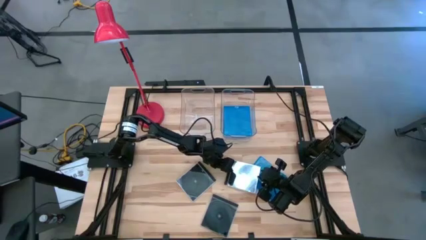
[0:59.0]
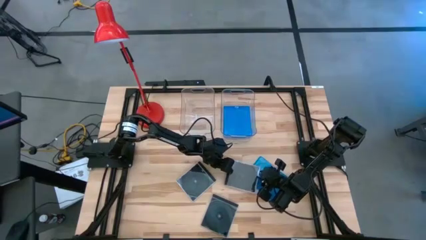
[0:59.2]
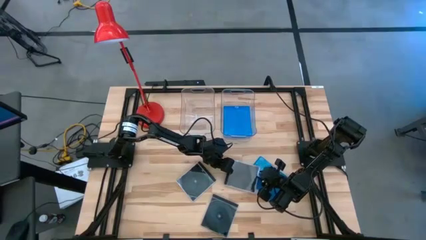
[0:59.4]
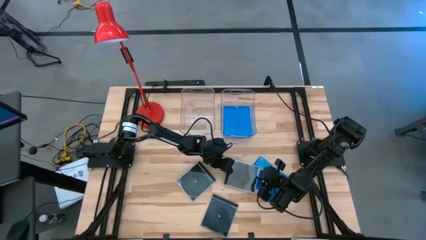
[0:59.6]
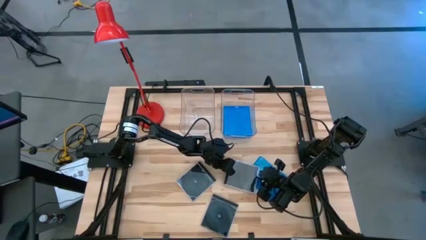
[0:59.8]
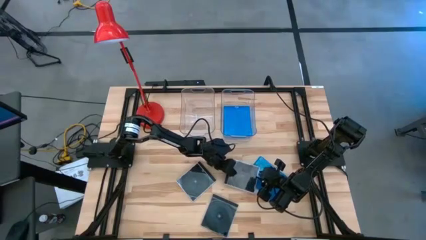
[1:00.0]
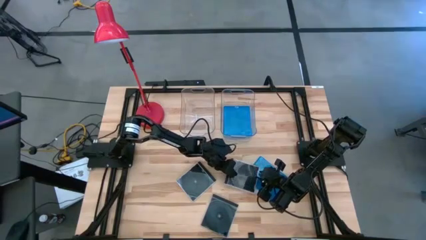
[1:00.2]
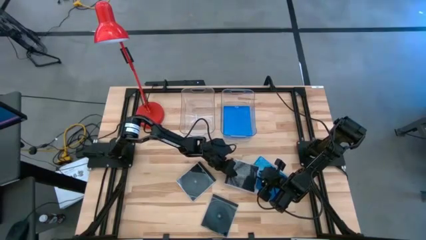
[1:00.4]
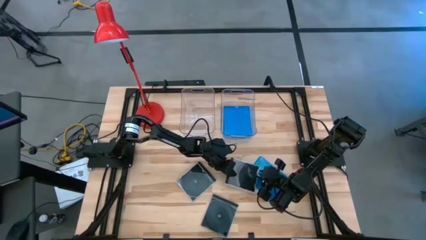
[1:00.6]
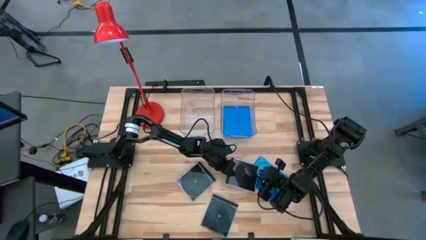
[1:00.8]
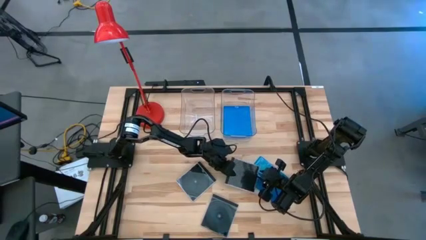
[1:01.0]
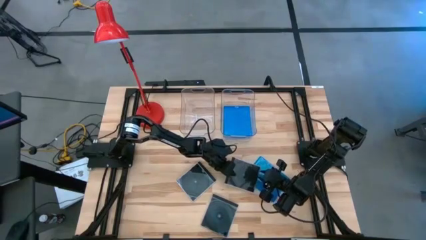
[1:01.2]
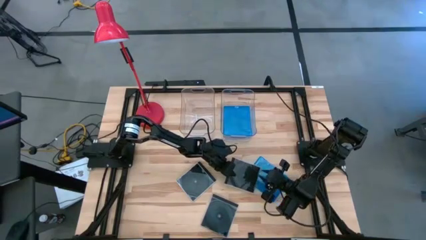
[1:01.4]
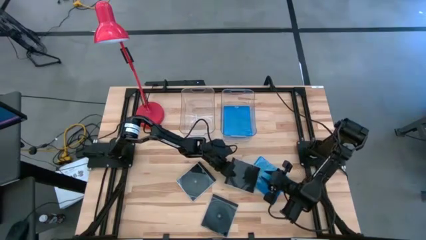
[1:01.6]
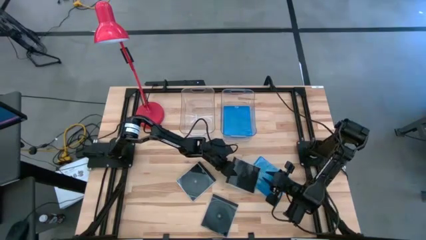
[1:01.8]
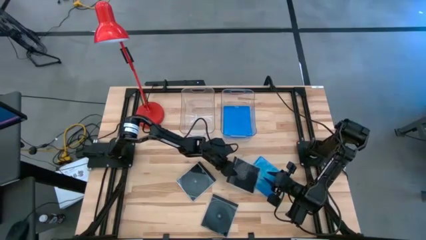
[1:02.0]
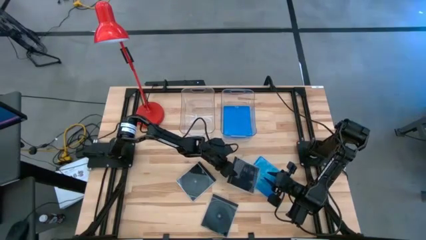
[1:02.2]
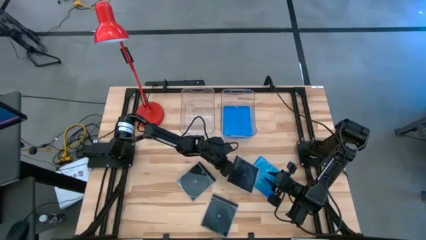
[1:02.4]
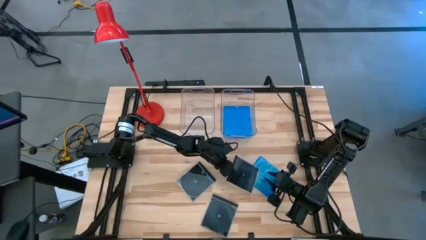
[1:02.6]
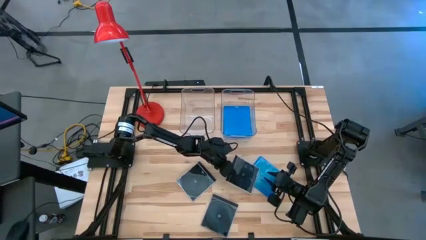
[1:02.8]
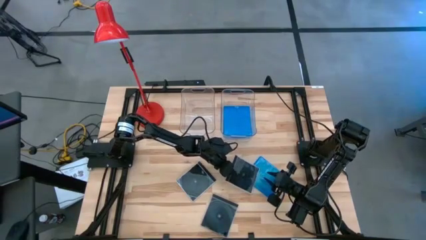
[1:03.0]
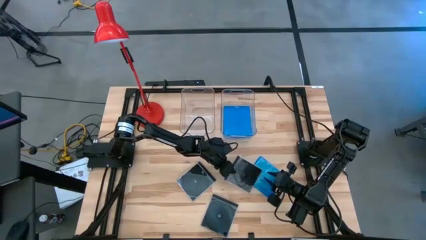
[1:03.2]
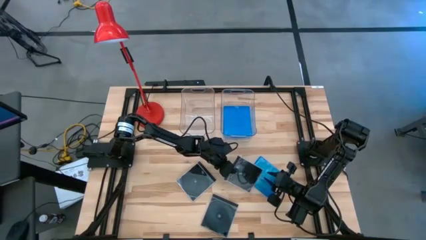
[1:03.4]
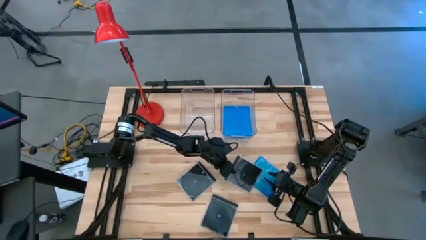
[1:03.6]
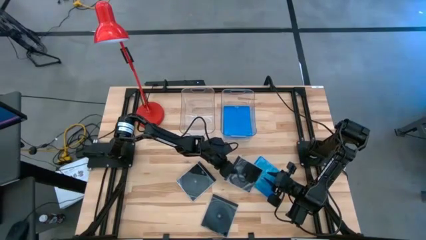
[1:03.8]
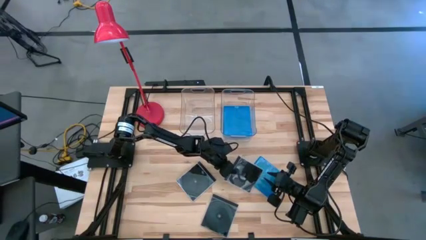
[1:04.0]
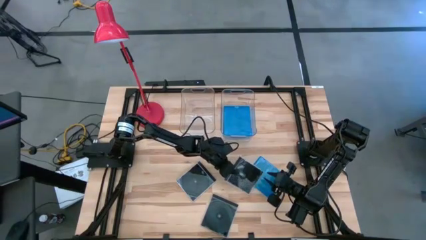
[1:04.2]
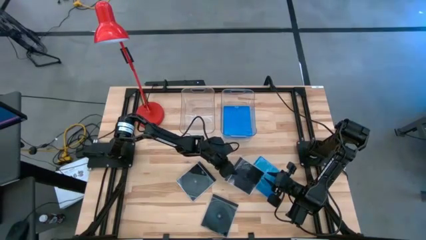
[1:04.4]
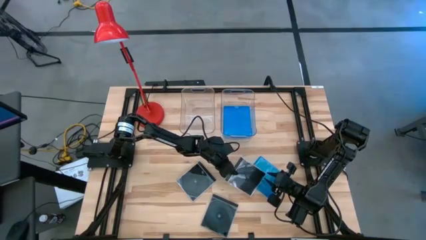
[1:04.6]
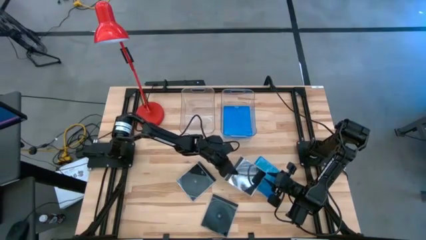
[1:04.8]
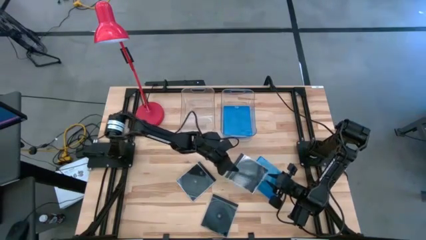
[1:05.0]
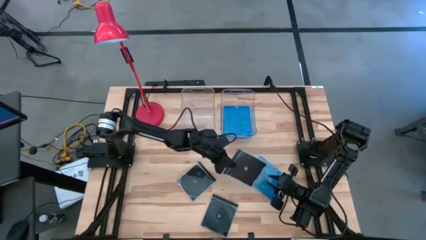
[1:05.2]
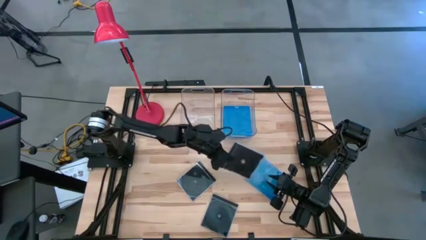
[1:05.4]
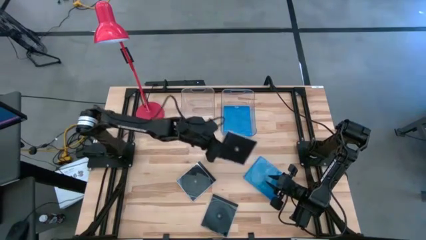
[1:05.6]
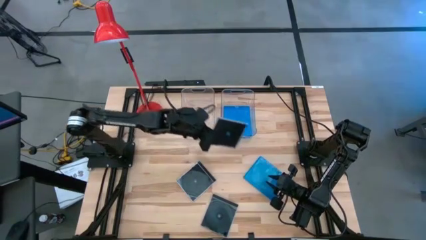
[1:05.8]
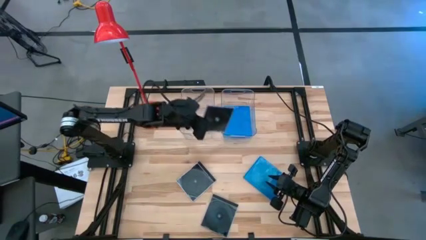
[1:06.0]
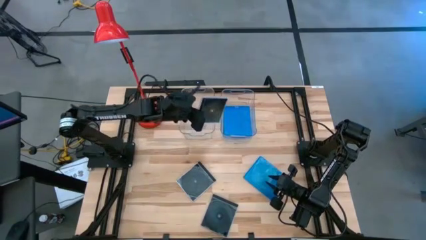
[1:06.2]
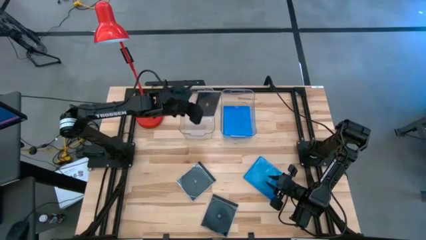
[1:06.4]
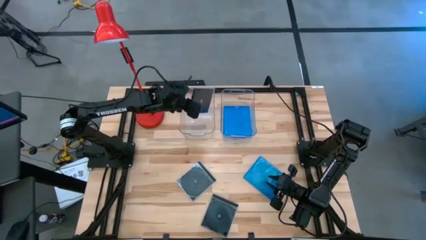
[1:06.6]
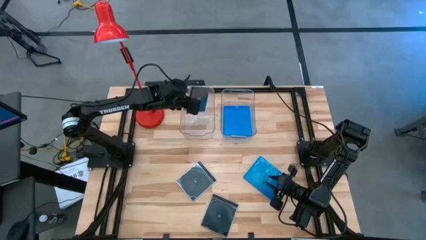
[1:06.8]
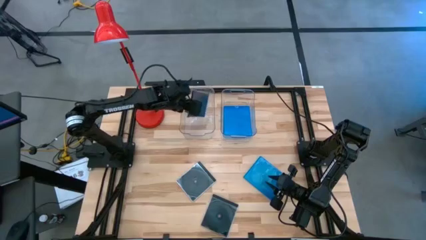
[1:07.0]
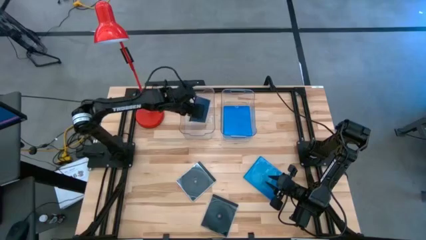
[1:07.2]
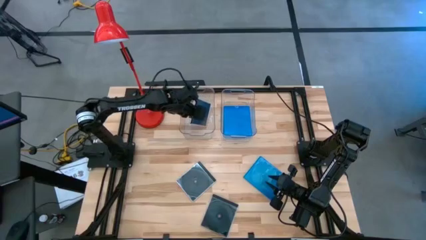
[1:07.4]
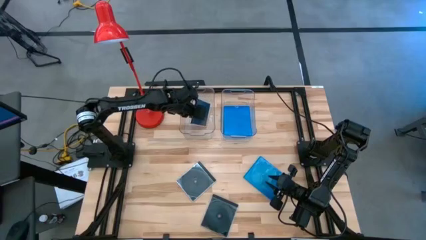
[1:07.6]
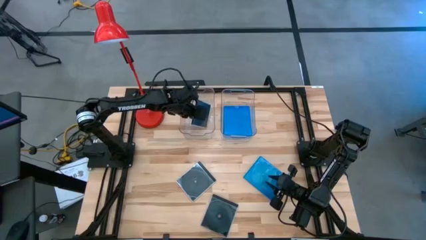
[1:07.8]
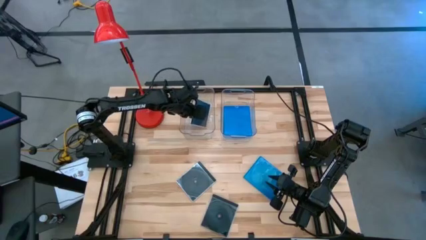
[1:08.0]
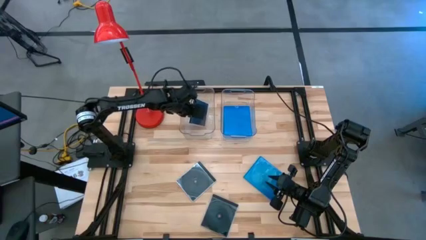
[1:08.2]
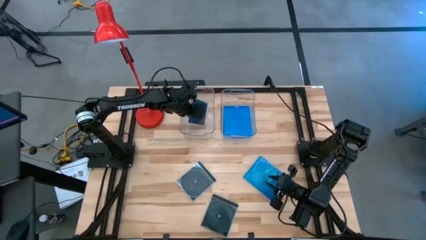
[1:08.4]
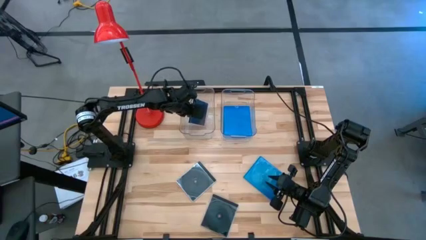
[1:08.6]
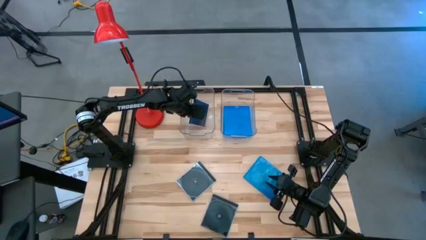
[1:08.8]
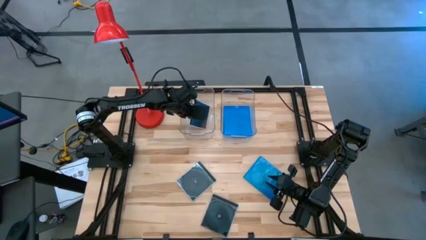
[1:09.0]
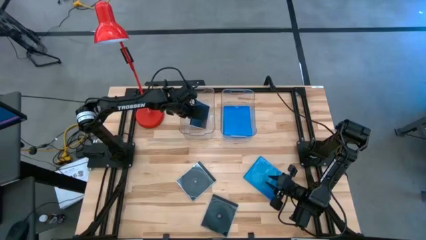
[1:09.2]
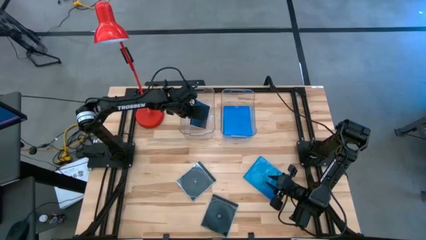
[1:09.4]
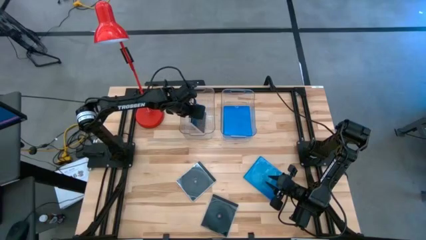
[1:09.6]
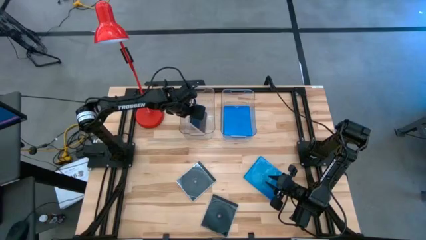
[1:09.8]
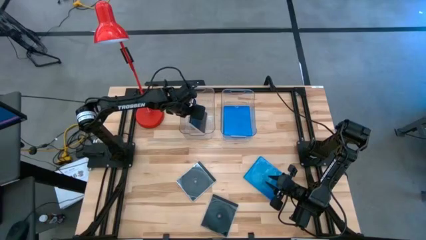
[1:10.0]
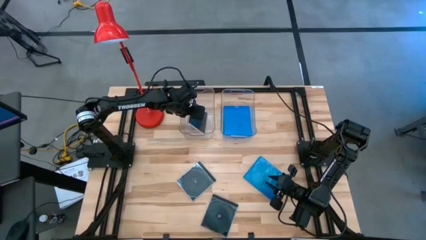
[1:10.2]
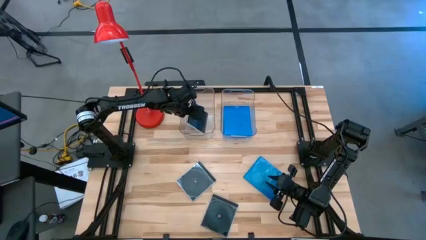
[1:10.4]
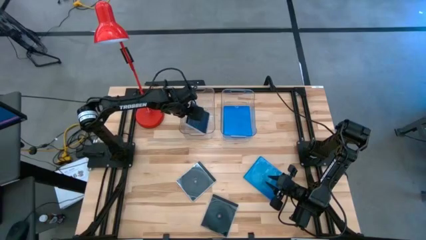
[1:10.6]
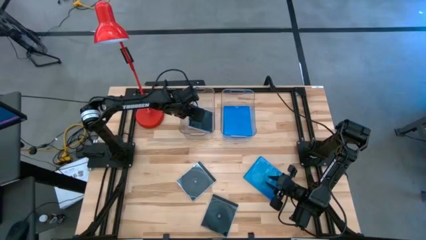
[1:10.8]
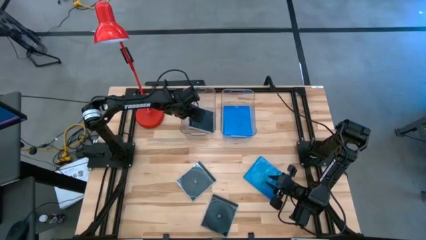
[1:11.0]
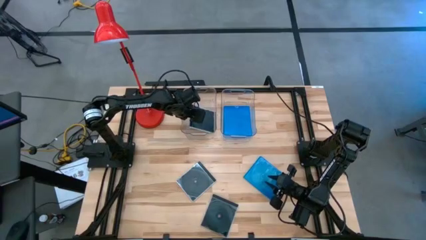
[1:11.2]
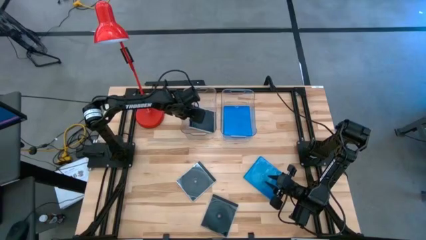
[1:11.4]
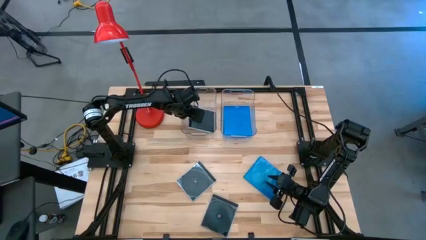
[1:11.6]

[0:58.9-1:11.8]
Task: Pick & place jewel cases by type
Put the top right black cd case into the left transparent bin

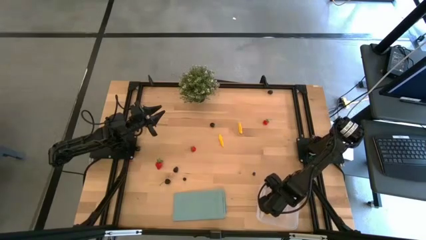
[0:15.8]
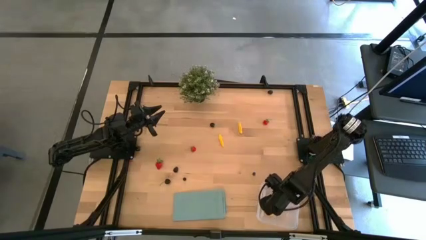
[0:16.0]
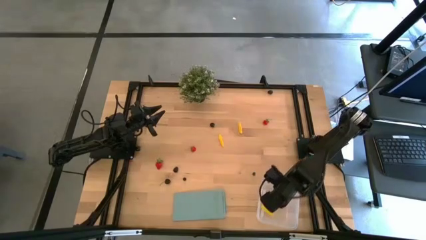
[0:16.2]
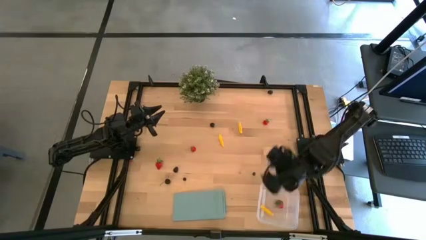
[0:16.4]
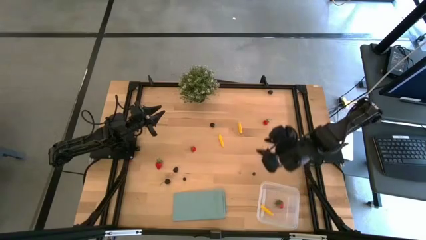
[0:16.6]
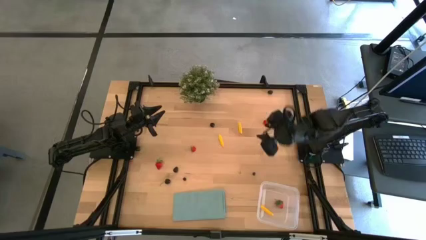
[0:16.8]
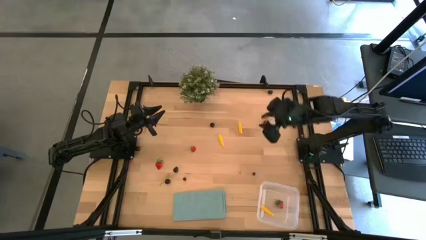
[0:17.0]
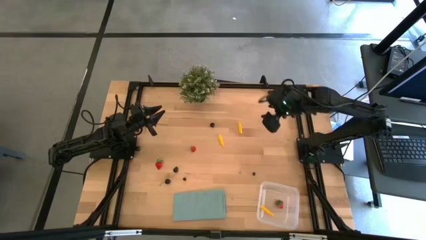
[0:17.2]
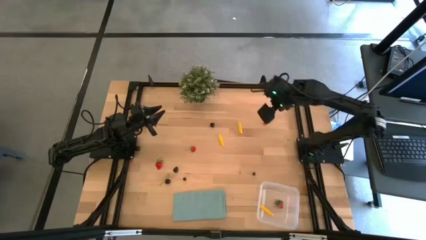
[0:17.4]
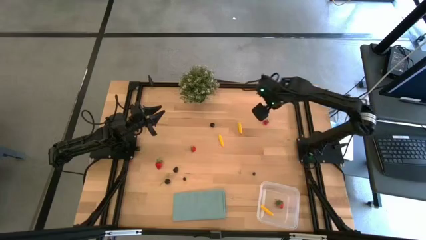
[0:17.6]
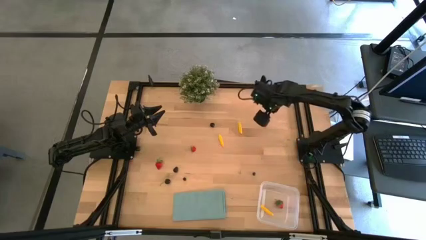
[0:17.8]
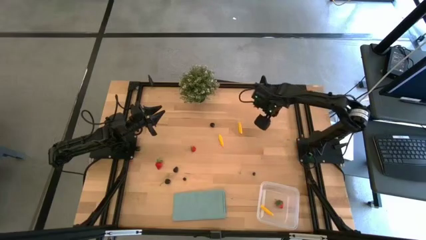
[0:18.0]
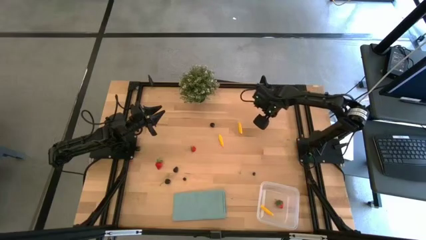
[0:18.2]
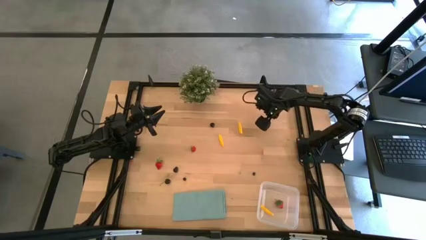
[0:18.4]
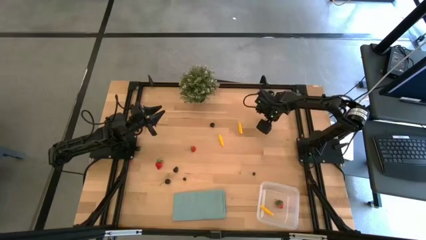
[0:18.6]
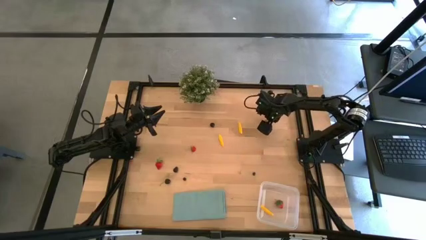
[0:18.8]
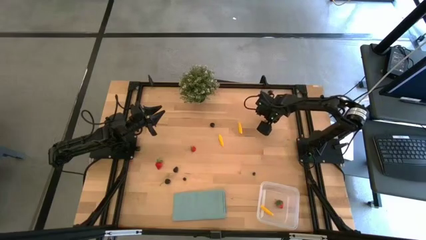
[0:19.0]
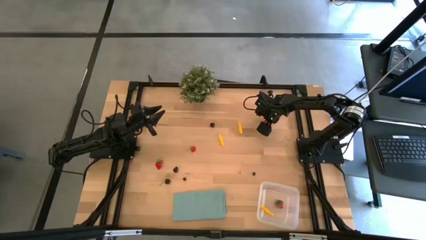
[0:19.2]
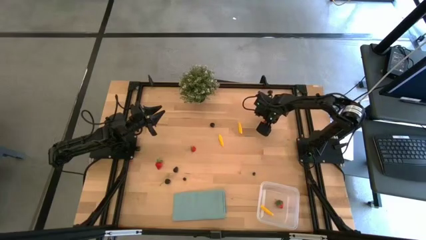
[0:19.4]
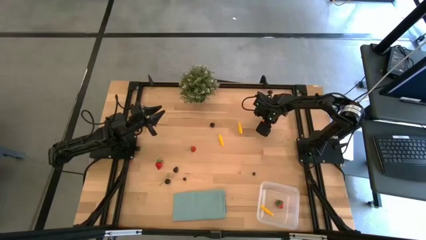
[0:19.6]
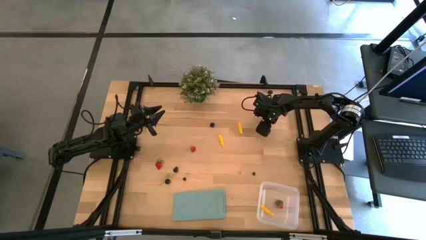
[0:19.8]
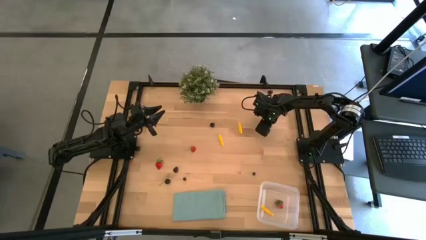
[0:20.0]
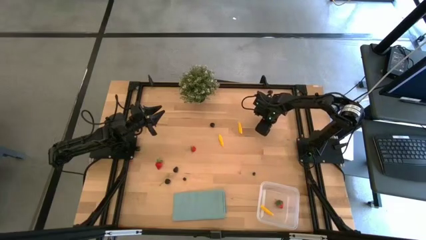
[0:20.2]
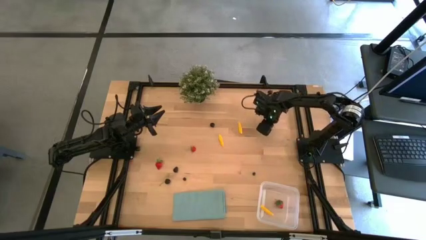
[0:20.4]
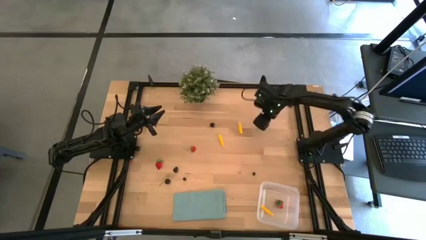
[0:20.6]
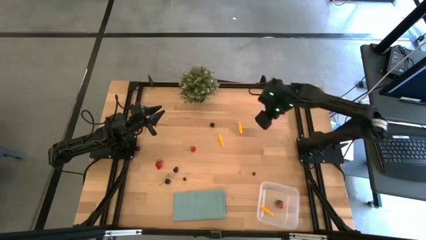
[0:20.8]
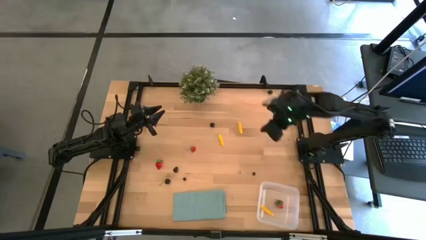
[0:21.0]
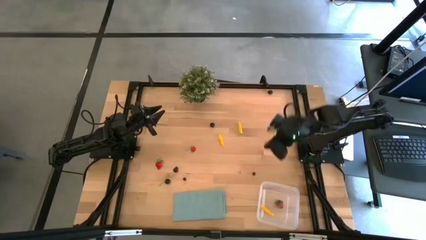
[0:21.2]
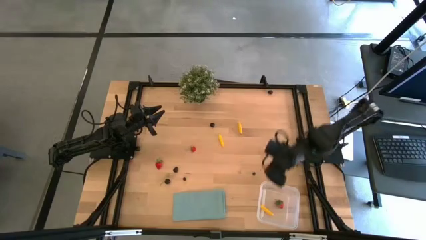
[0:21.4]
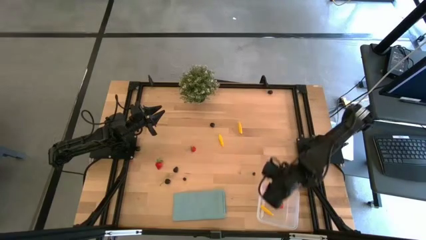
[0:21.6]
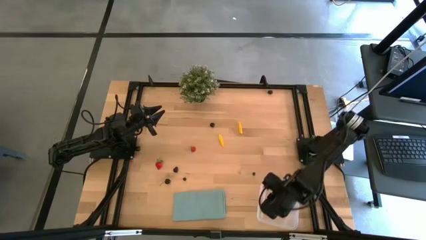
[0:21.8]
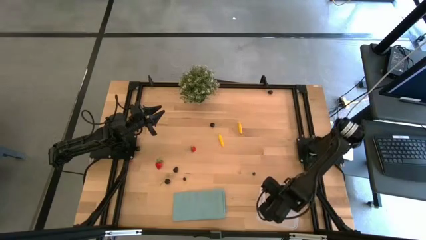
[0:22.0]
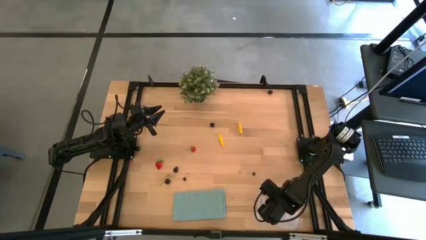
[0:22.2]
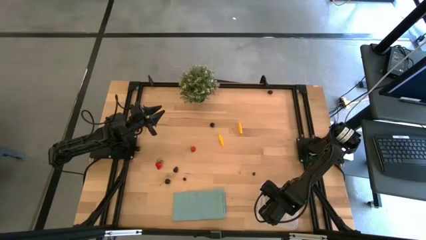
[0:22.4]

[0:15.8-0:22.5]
Task: Pick and placing Produce into tupperware
Put the red strawberry into the transparent bin
